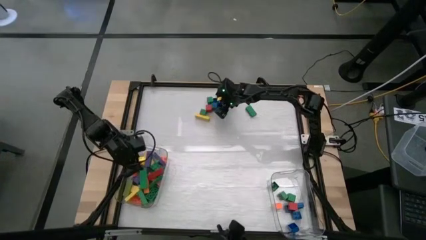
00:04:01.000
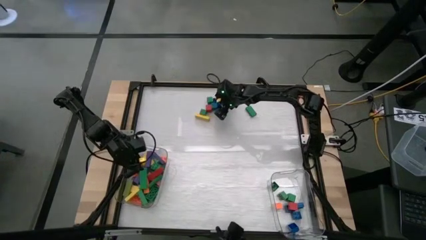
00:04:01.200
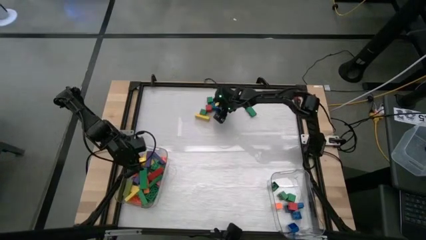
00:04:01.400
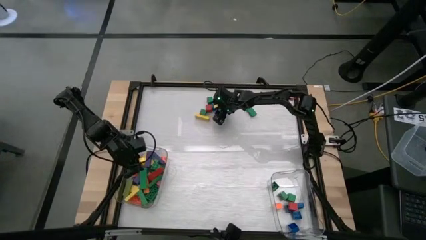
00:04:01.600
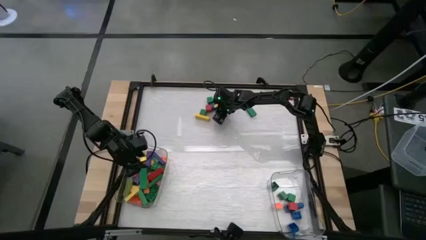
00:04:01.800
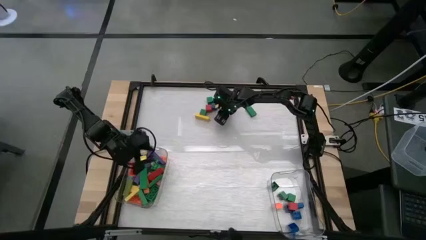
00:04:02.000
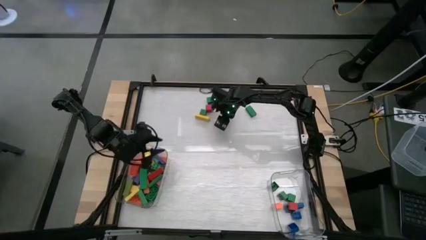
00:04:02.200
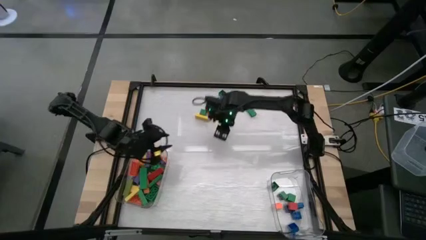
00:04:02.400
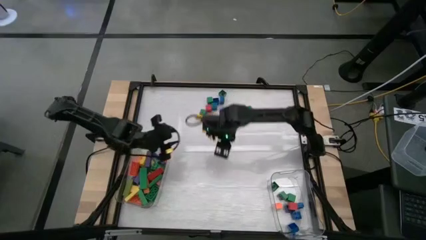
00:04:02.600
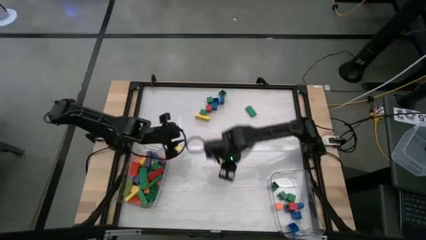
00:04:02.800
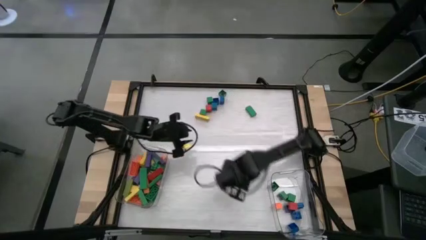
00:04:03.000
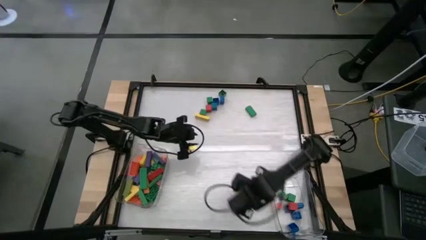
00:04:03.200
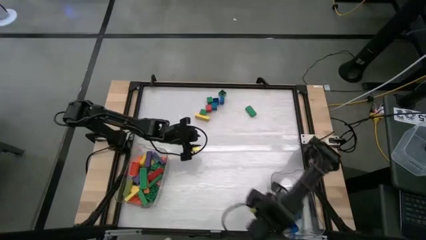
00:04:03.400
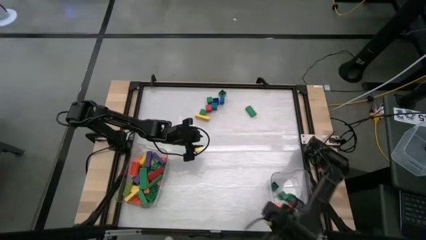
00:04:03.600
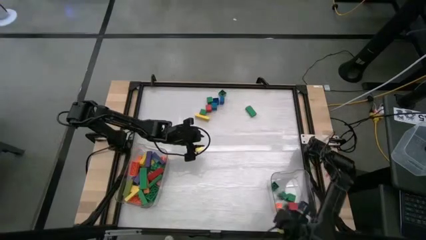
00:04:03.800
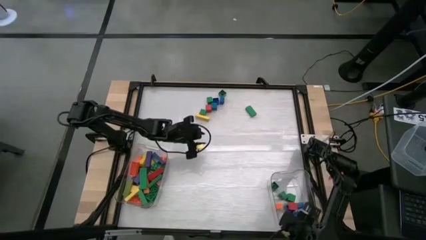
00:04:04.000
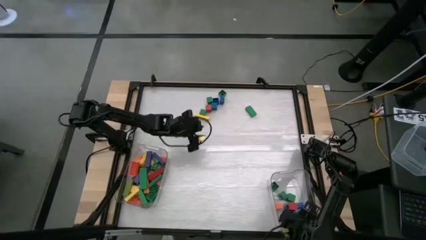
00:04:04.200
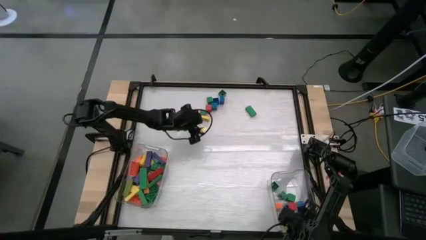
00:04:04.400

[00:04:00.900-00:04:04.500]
Task: Sort blocks by size
Put the small green game piece into the right transparent bin

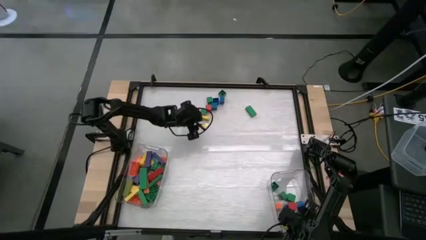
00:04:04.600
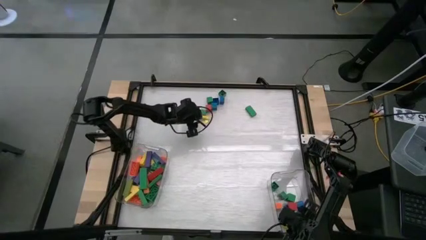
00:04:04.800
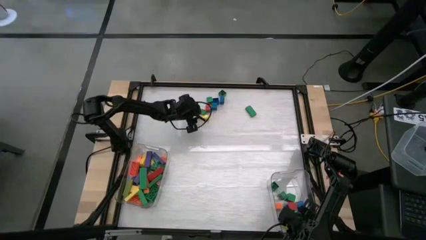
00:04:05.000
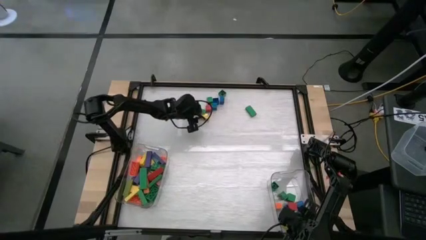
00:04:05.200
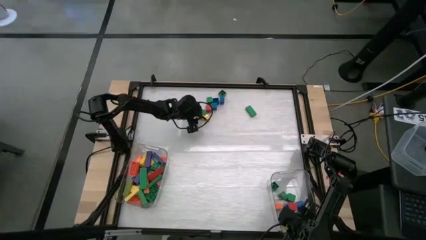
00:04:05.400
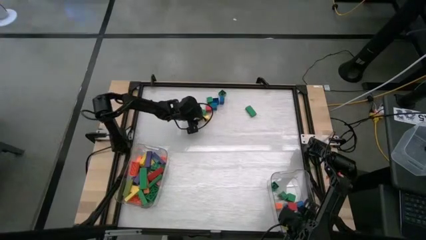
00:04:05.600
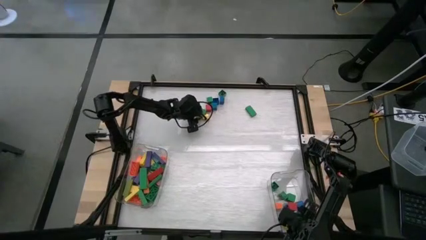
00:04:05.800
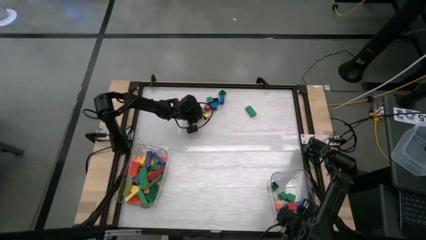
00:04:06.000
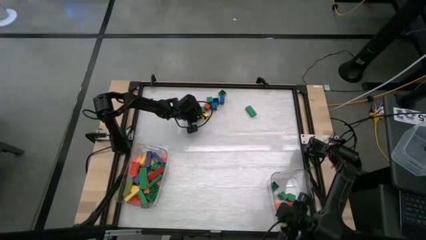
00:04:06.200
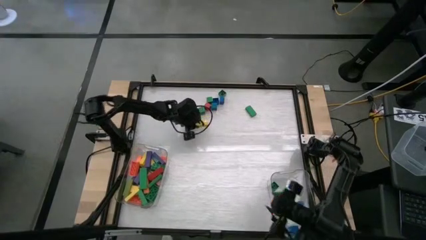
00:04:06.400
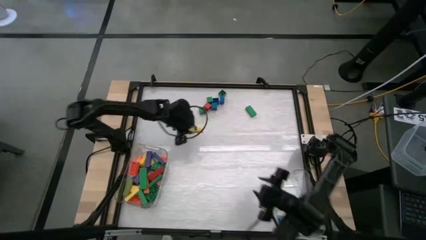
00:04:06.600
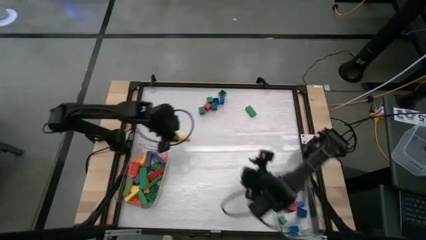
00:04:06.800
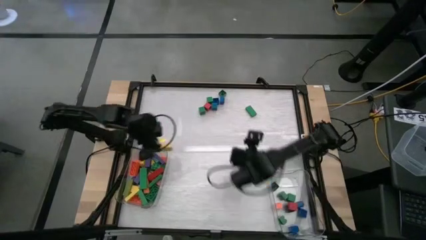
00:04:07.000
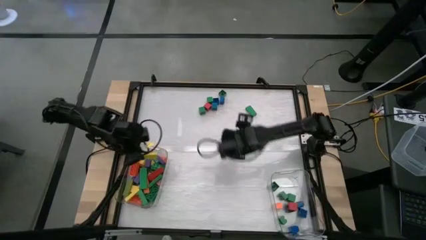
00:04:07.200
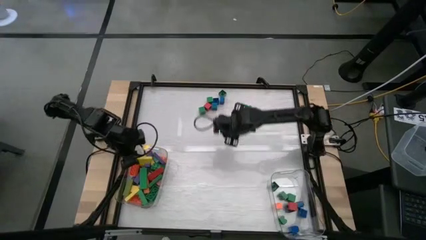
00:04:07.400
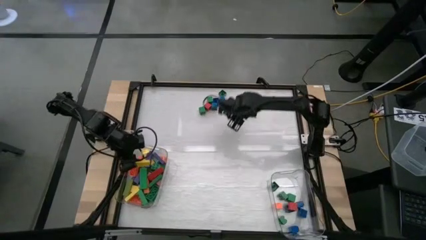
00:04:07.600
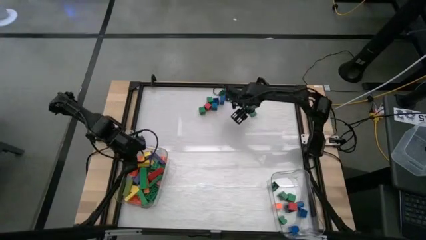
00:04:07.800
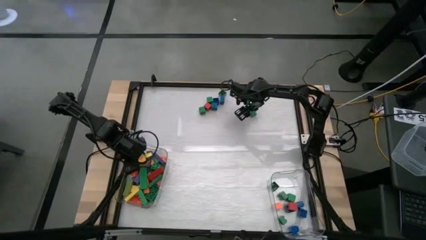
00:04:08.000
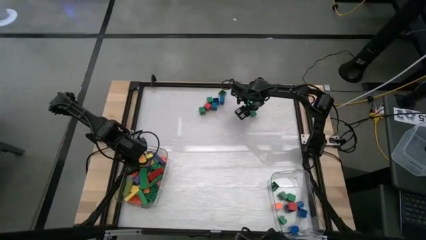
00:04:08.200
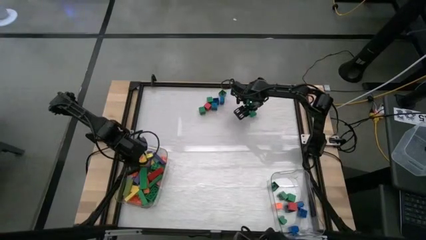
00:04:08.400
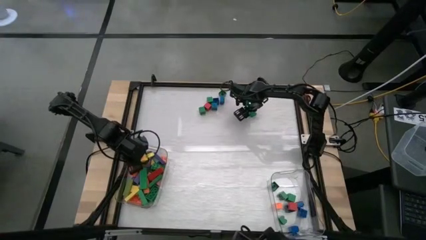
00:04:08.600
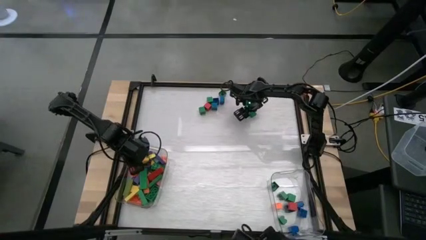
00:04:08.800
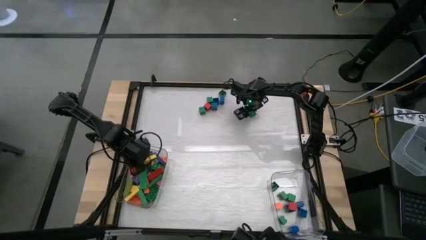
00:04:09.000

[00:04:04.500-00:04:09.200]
Put the large yellow wooden block into the left transparent bin

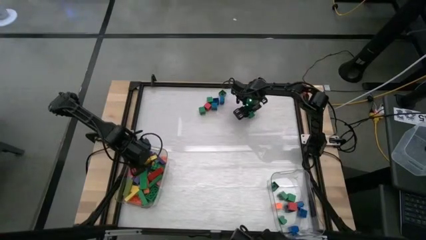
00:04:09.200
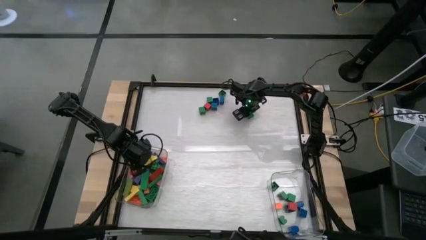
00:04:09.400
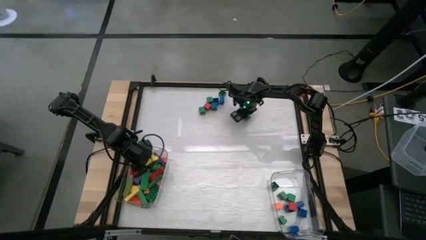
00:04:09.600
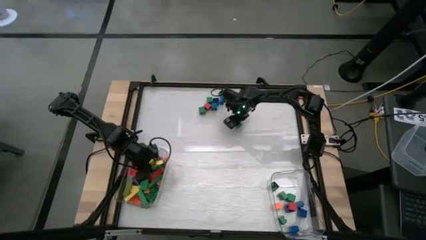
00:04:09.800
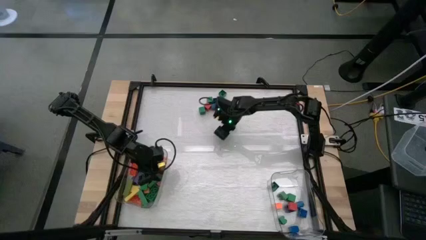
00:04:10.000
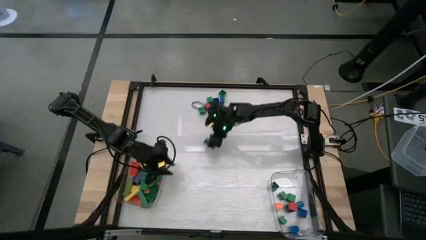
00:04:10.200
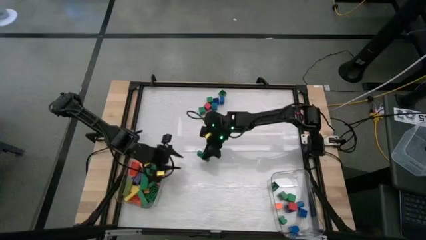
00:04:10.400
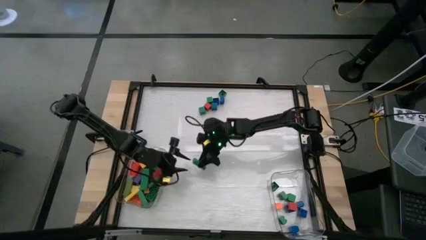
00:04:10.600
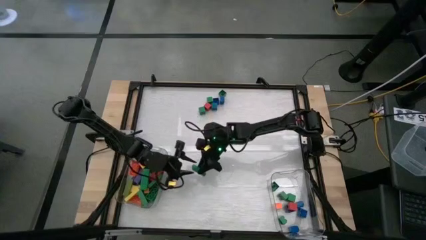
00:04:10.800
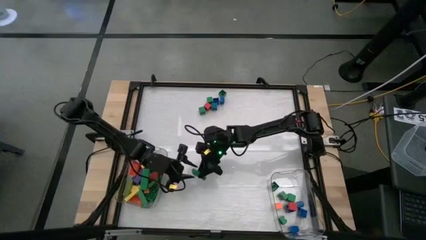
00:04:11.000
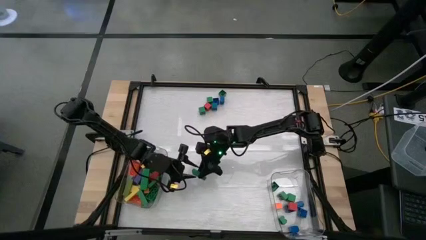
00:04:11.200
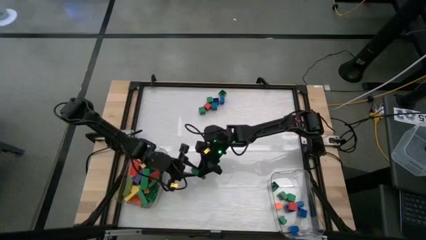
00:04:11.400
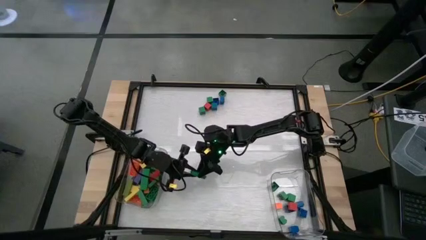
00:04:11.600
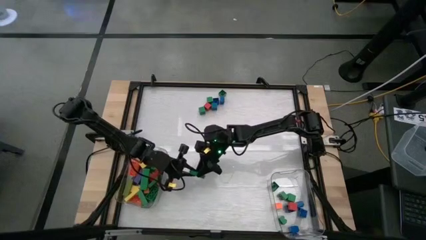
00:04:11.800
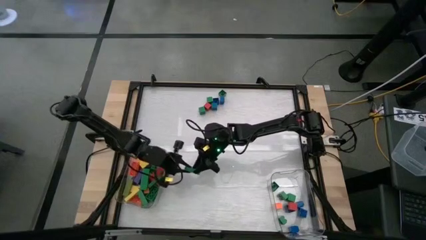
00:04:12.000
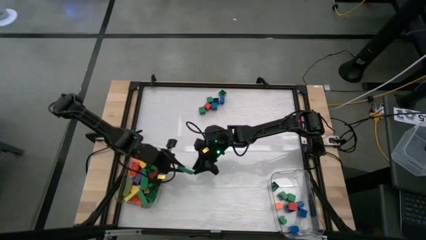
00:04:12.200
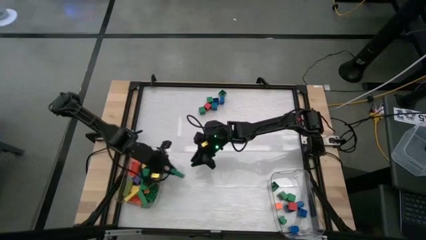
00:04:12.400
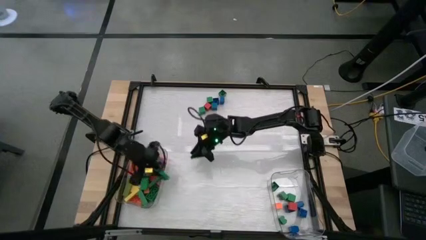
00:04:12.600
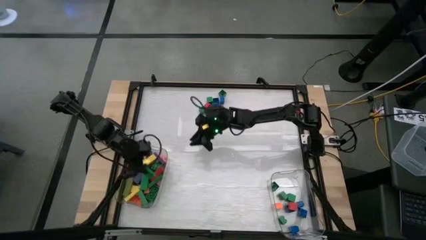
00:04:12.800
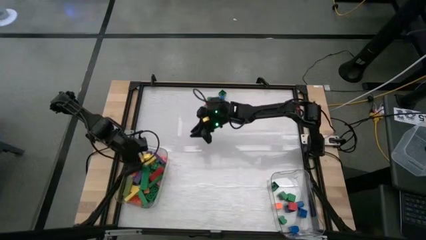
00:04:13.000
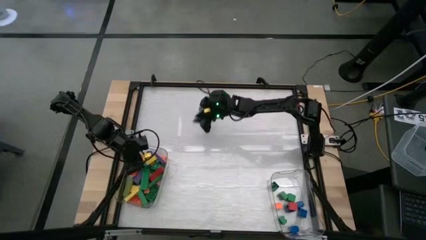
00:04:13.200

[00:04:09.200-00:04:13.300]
Put the large green wooden block into the left transparent bin

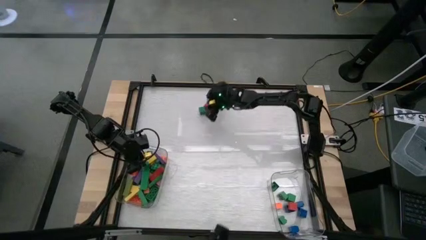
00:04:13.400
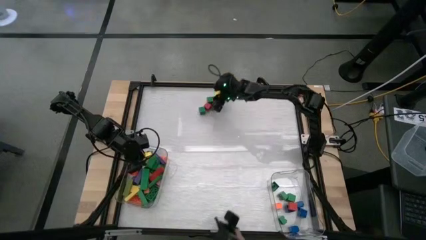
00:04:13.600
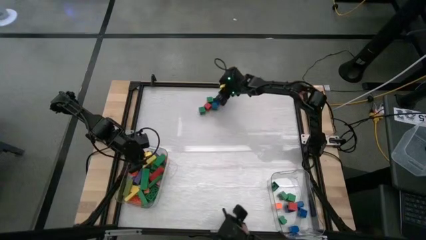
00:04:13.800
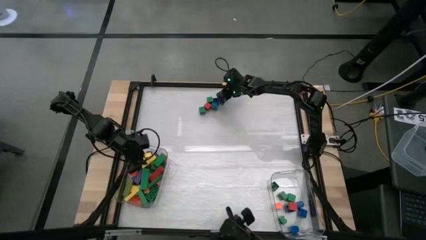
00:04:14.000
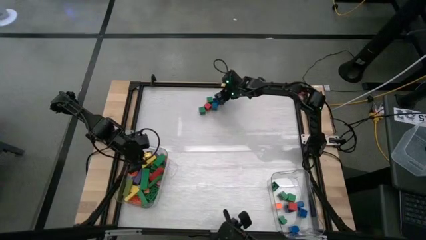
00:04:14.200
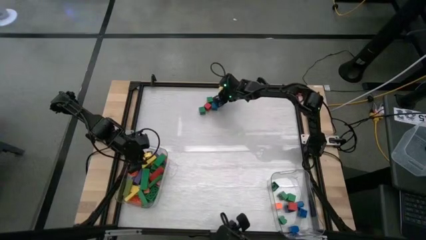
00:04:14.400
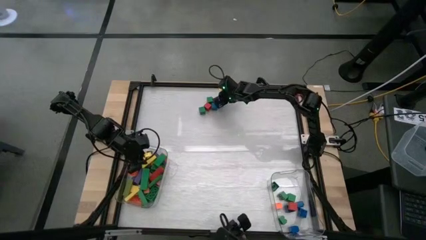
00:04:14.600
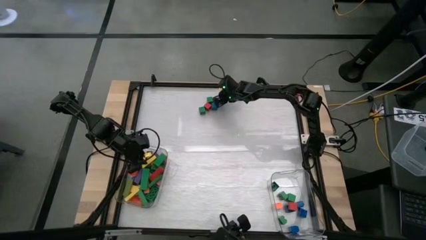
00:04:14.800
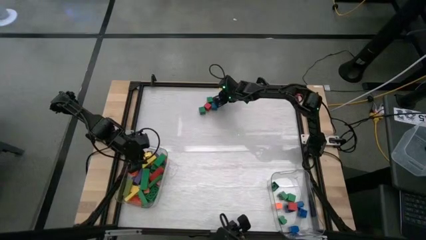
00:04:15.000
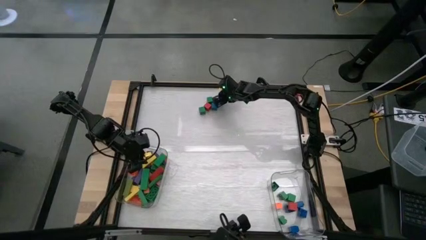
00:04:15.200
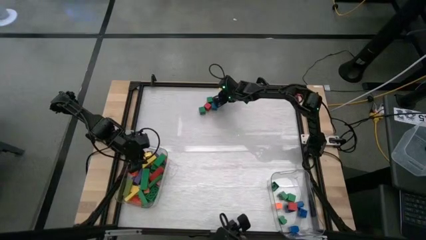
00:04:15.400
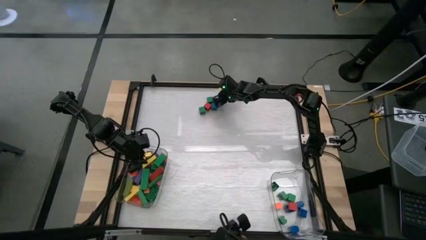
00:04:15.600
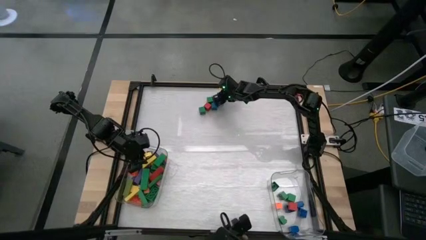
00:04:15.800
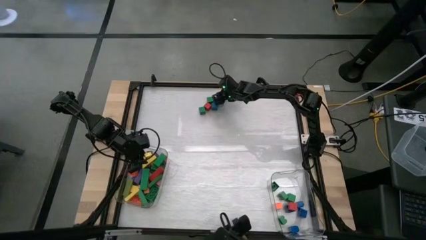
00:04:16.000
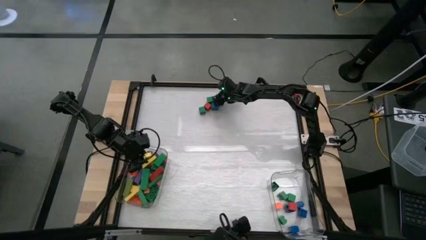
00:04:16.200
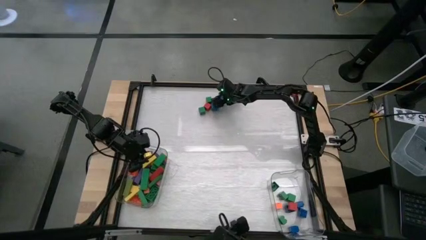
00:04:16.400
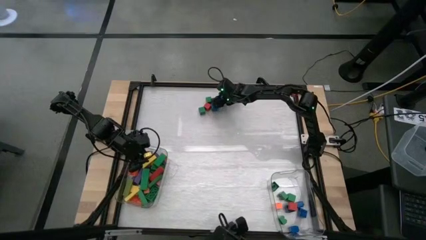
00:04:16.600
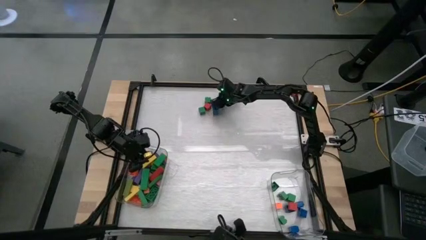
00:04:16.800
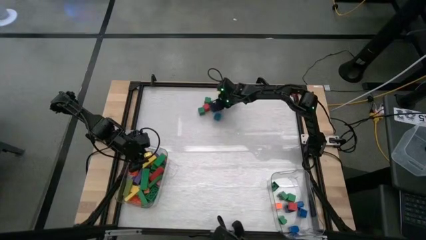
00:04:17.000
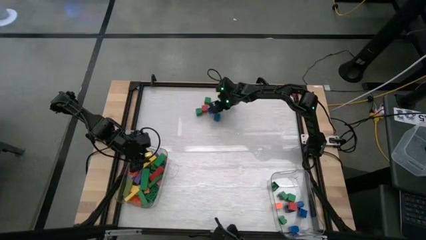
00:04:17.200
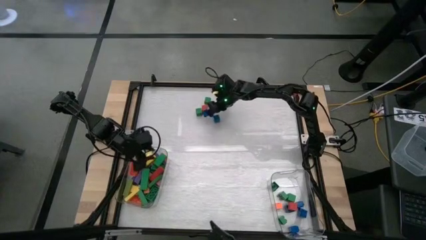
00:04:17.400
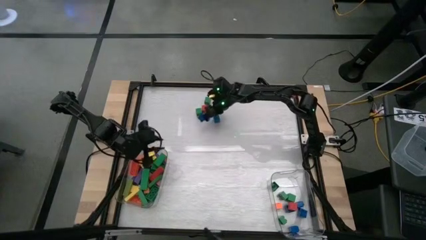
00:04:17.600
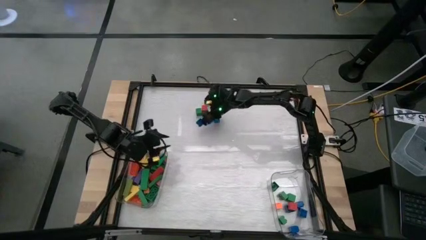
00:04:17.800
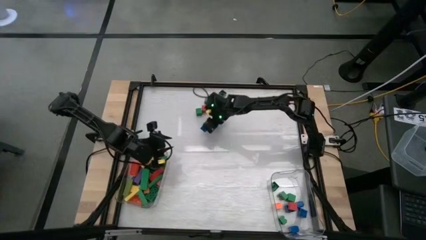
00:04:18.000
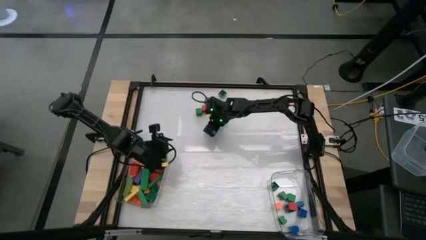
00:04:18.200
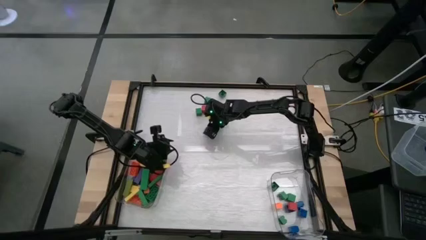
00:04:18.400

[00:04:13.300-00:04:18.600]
Put the small blue game piece into the right transparent bin
